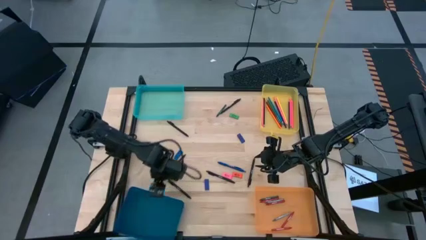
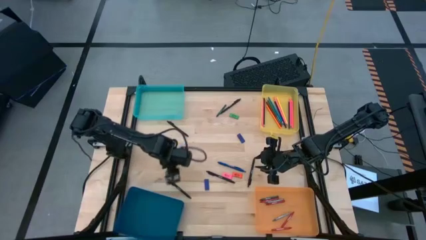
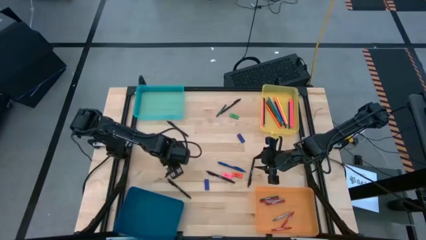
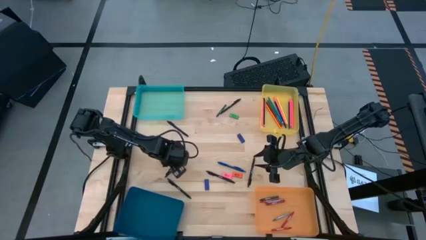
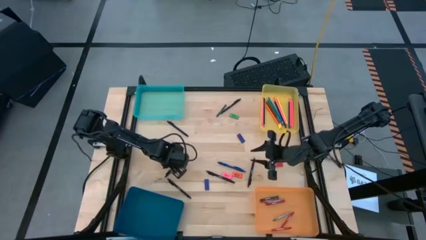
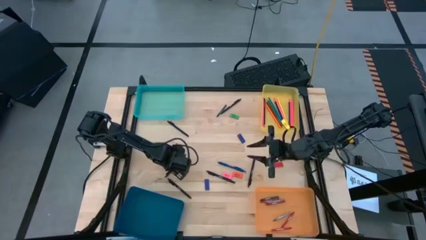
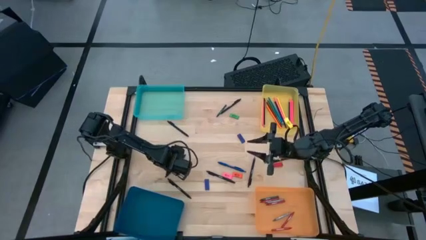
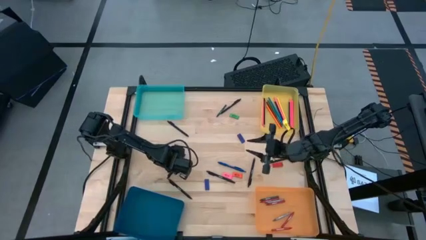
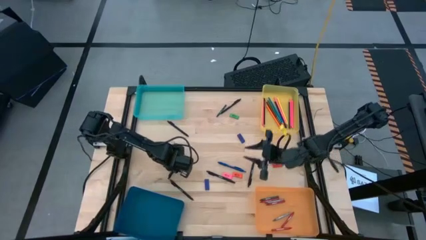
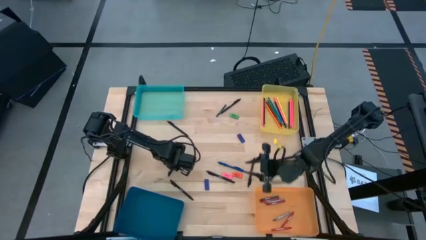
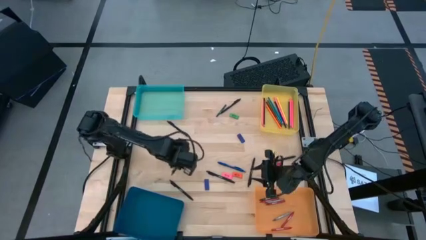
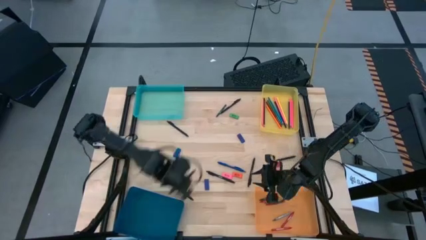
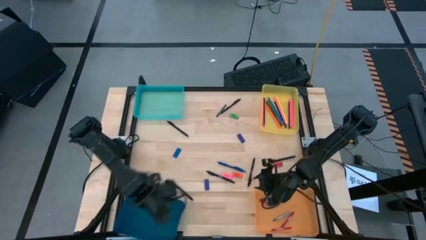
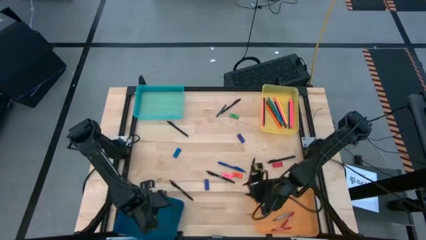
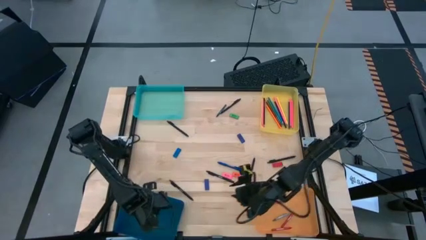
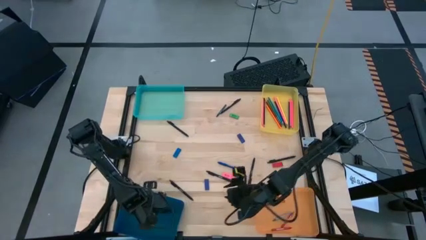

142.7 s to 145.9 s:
Task: Sort crayons/erasers/pens/pencils in bins
Put the black pen into the blue bin

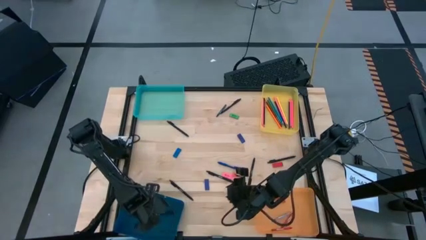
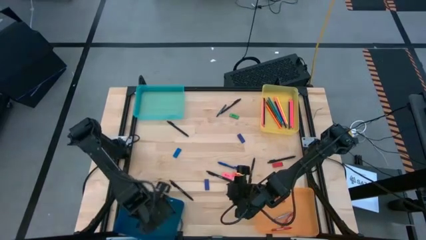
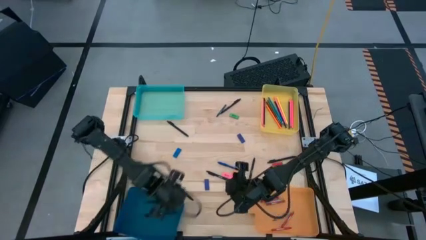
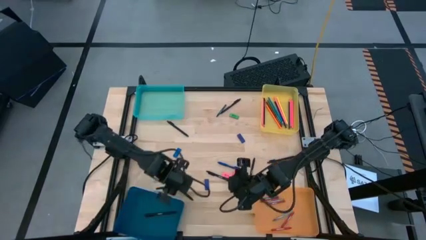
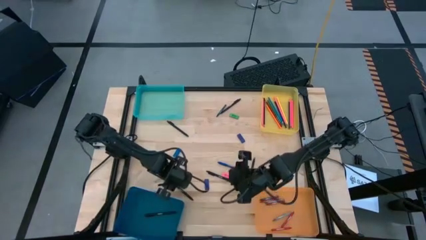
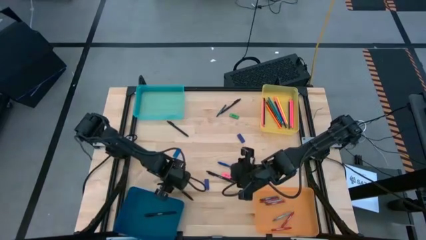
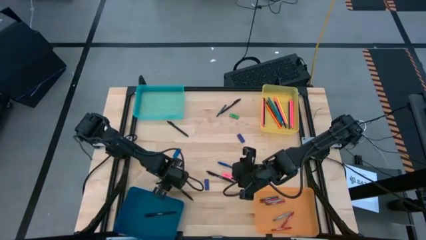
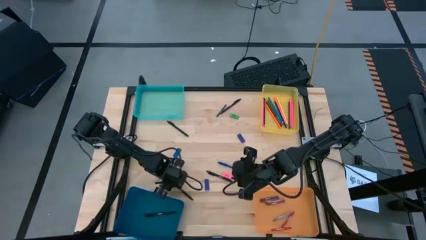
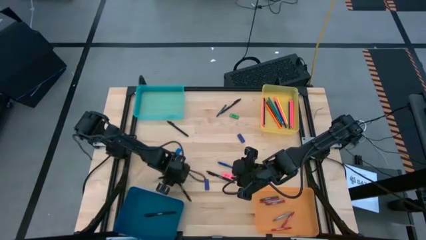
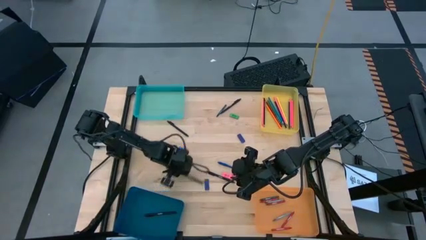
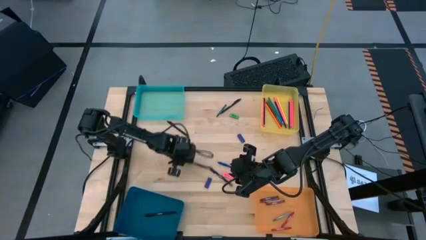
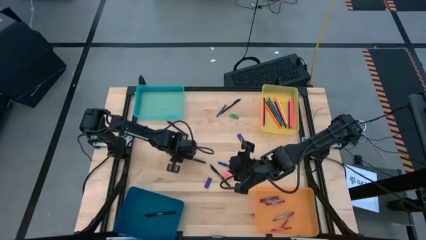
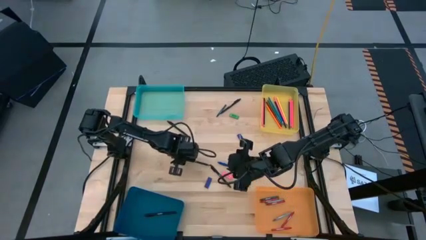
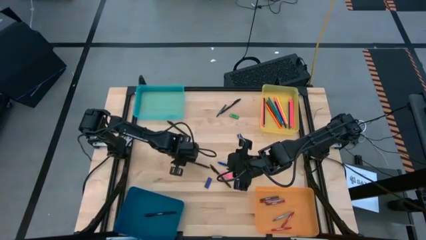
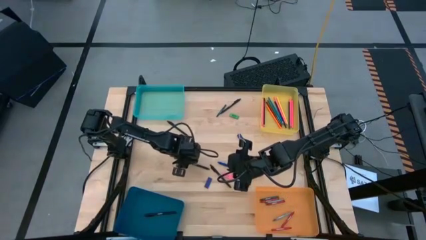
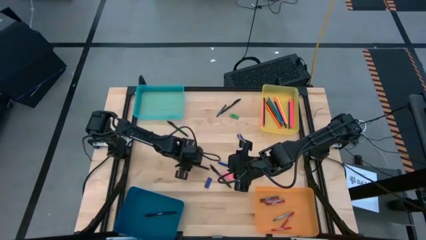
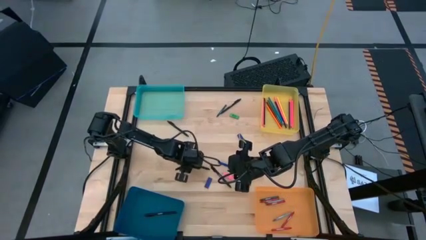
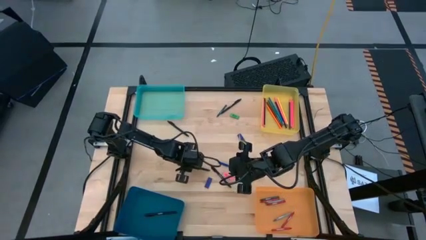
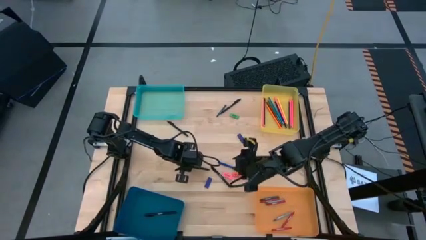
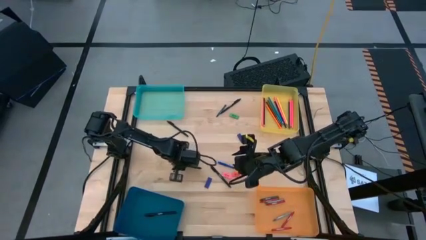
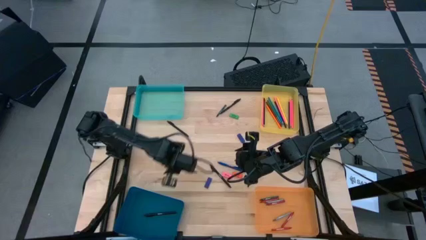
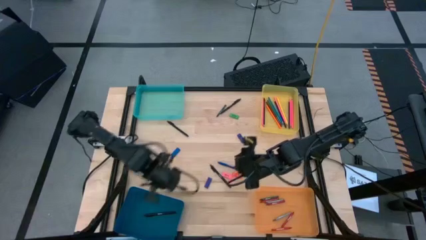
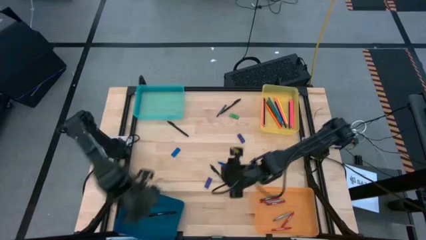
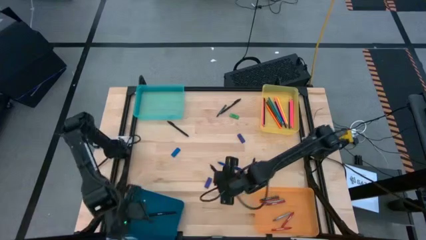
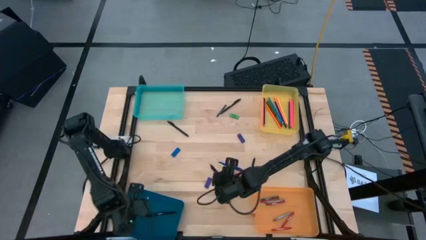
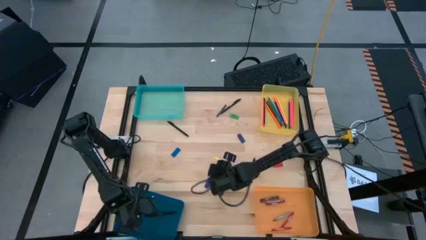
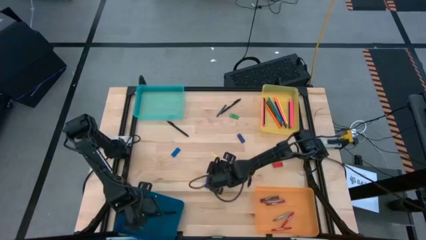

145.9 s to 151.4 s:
Put the black pen into the blue bin

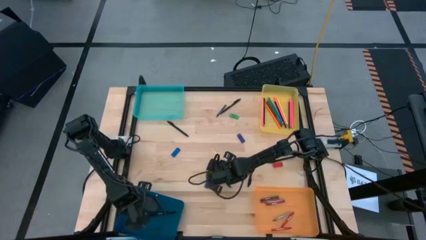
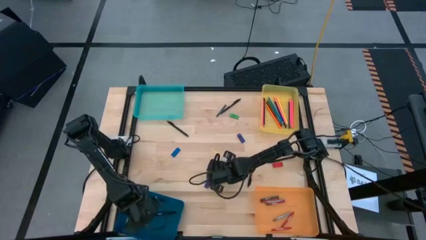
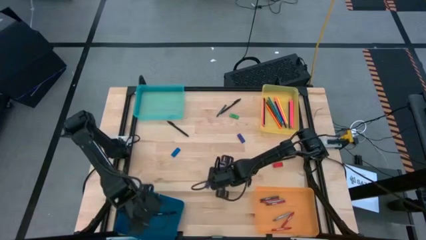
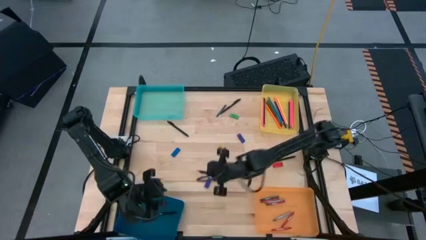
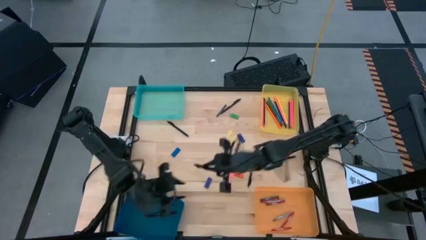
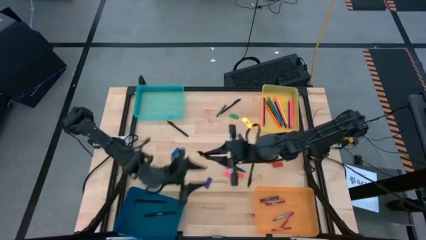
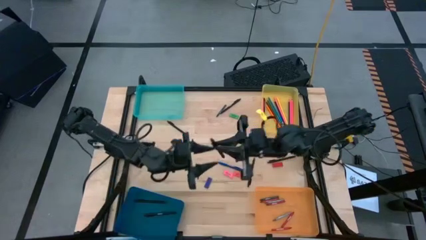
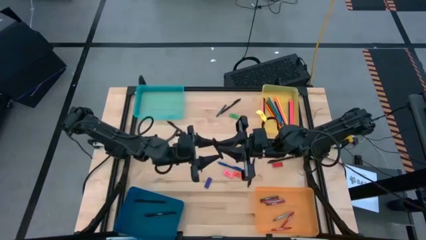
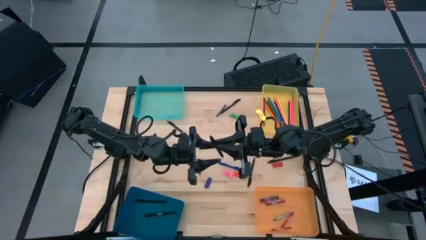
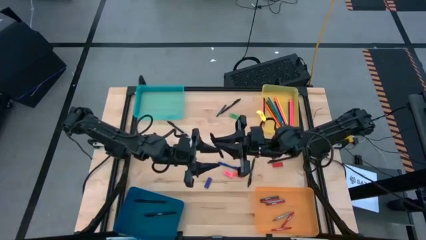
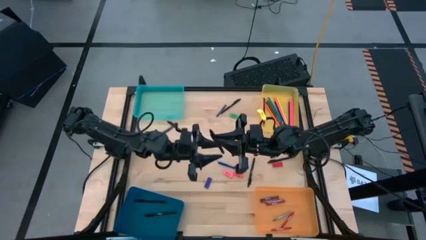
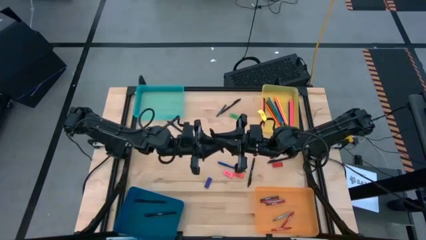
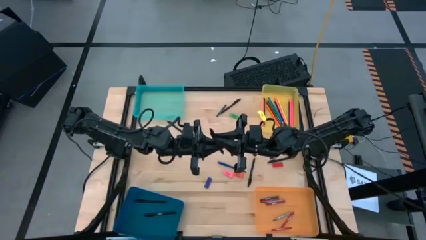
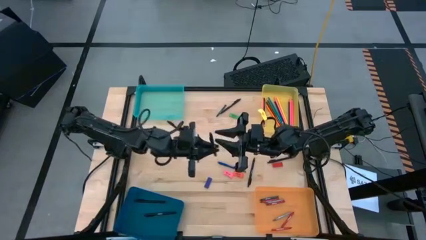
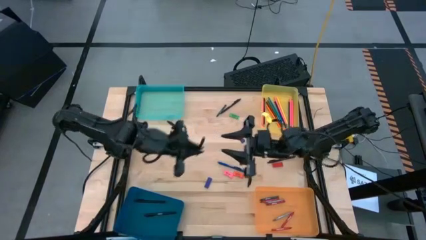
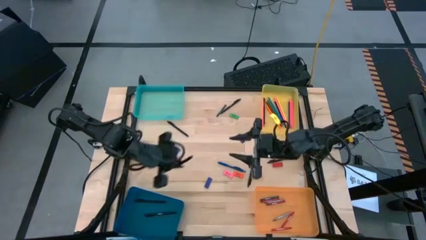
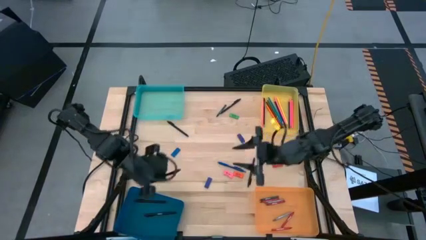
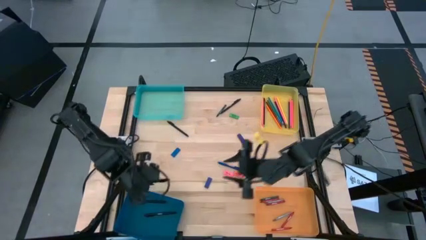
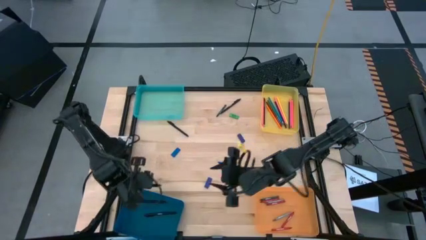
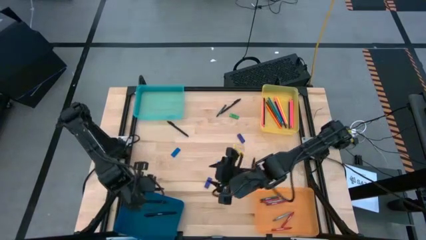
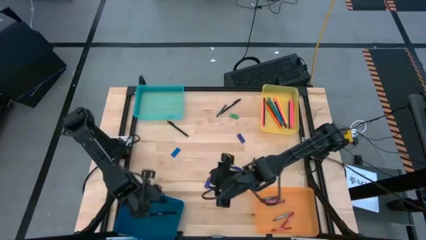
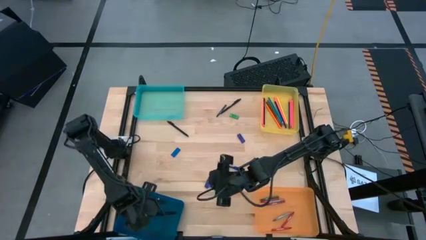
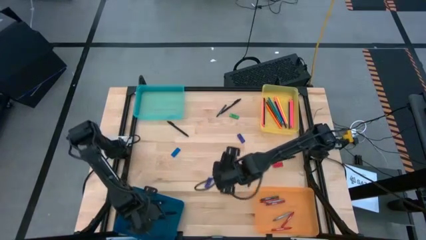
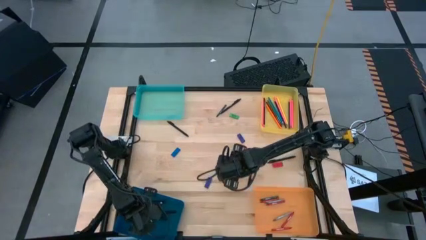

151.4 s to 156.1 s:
Put the black pen into the blue bin

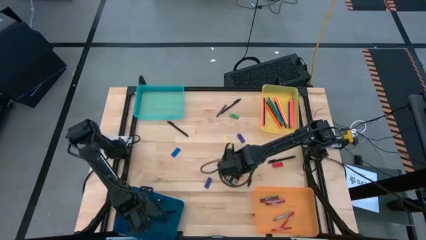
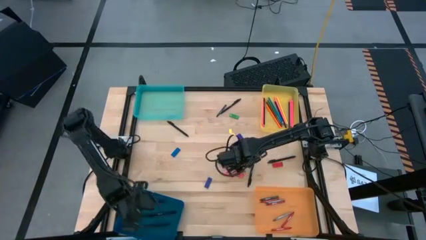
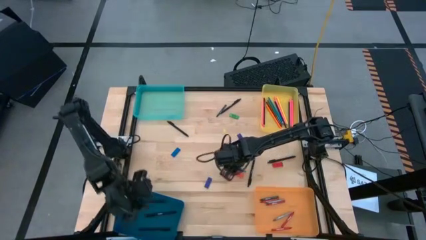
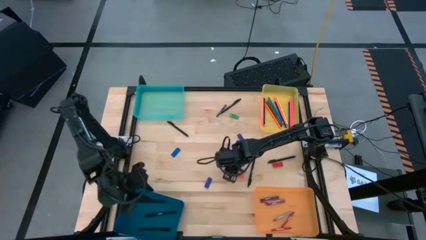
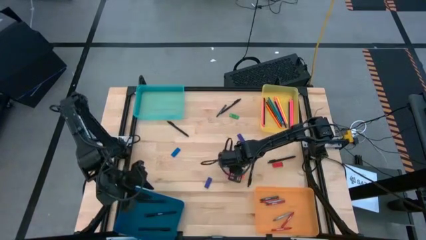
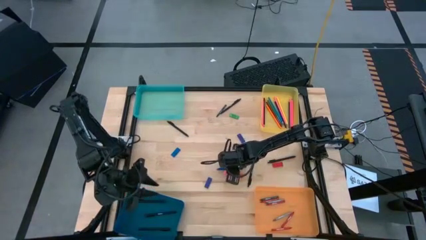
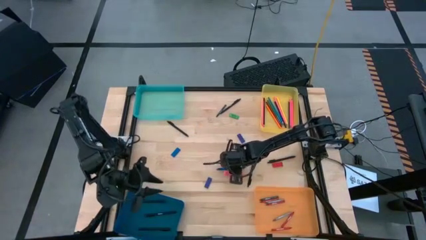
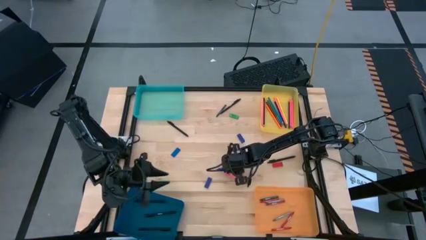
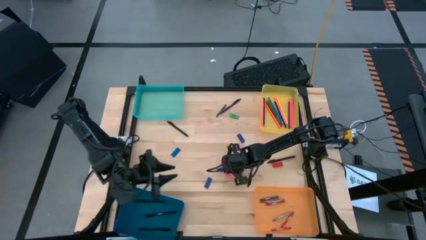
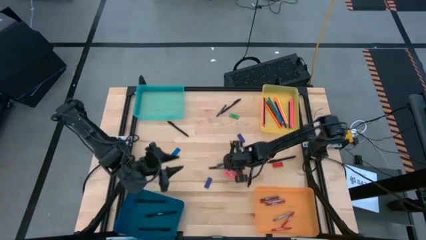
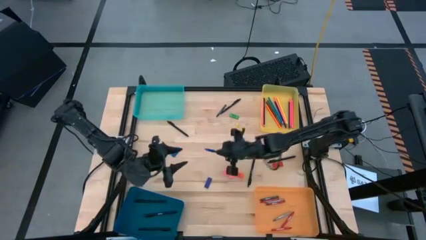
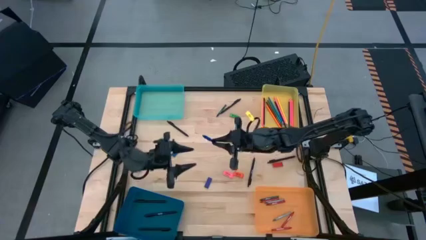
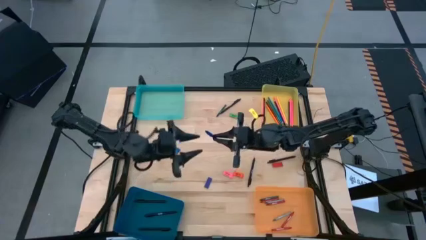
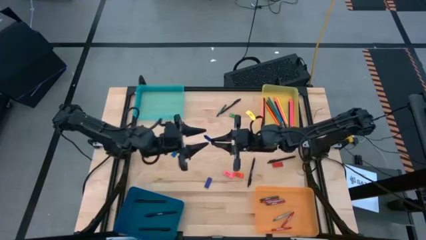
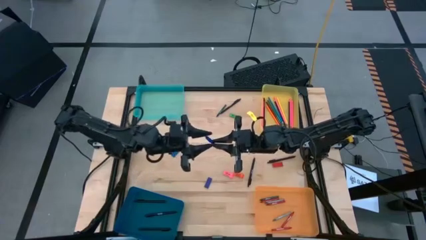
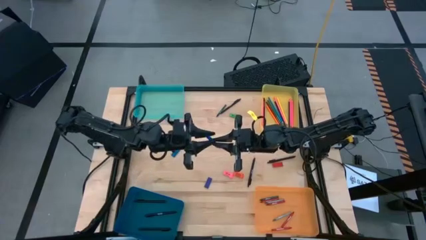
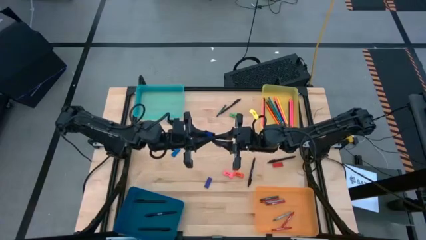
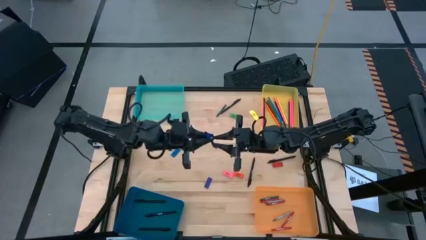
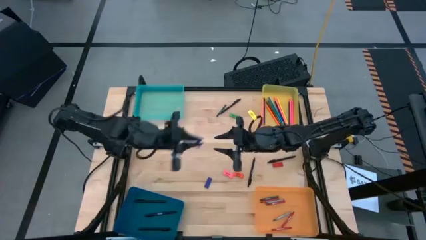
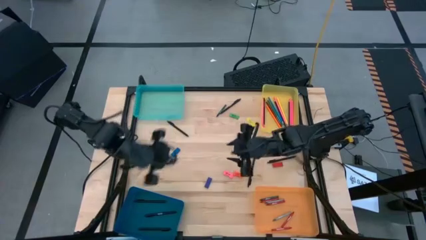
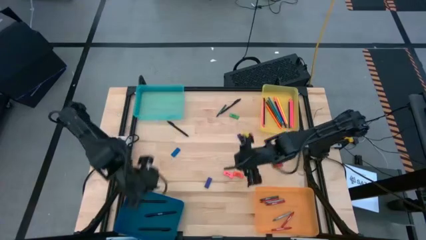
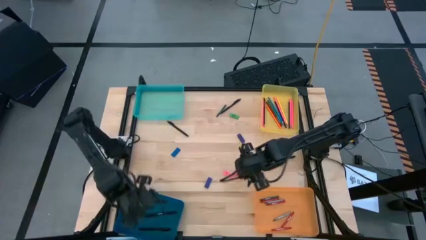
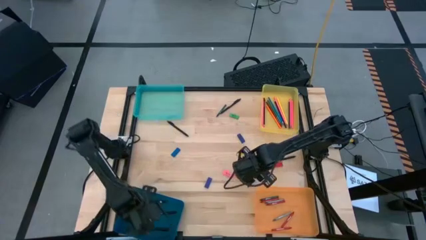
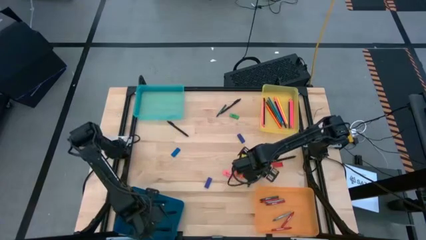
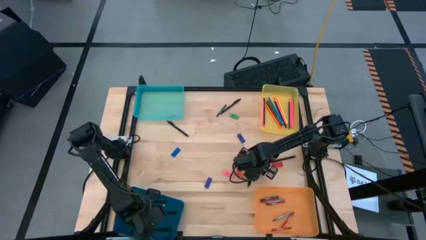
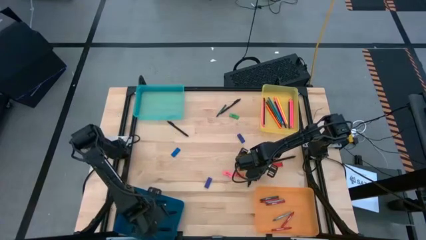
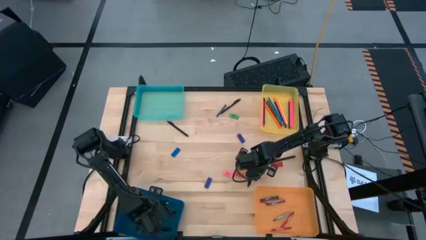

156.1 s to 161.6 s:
Put the blue pen into the blue bin
